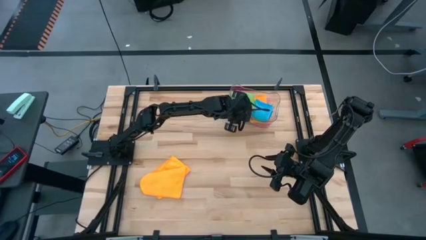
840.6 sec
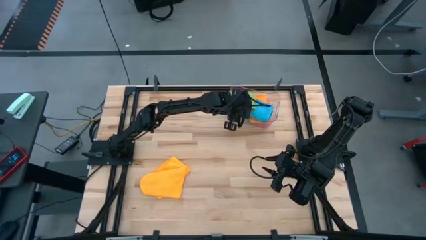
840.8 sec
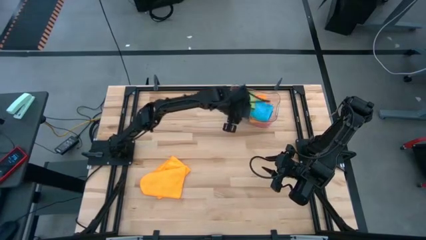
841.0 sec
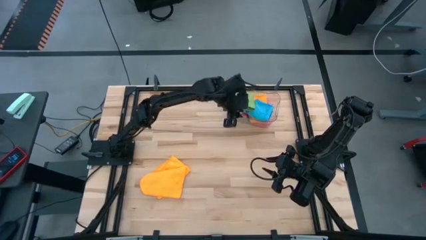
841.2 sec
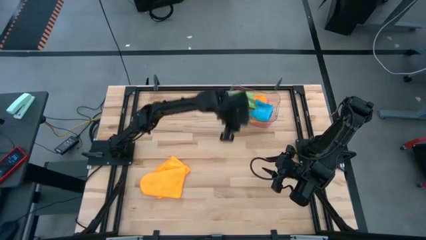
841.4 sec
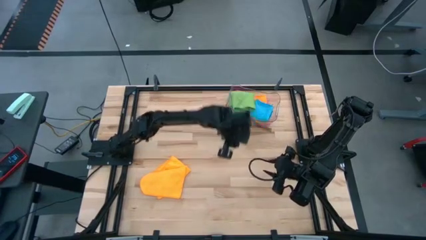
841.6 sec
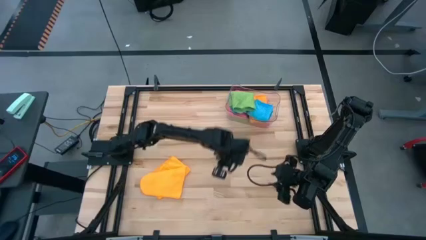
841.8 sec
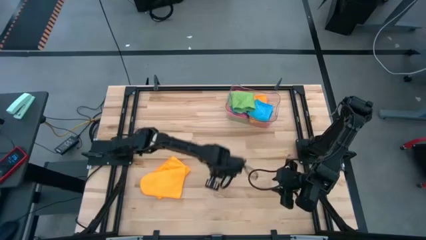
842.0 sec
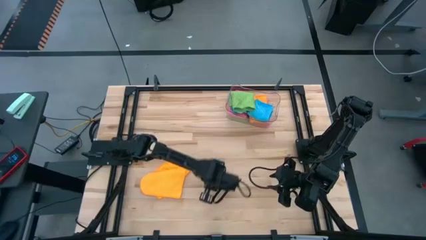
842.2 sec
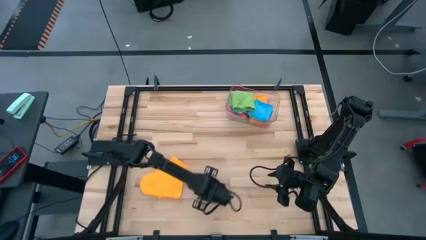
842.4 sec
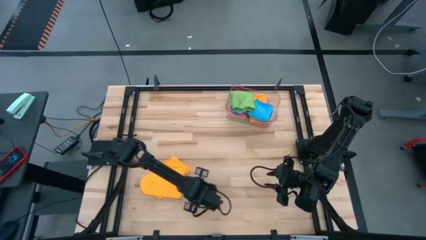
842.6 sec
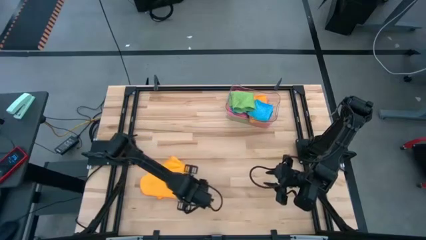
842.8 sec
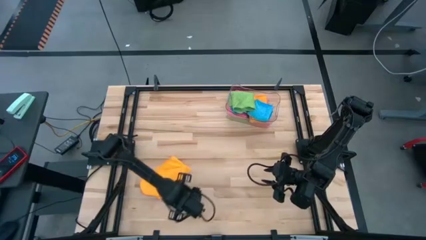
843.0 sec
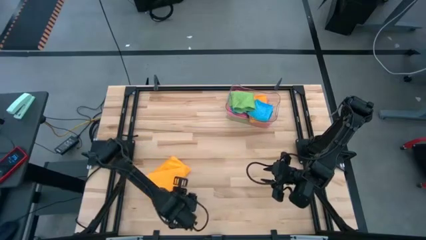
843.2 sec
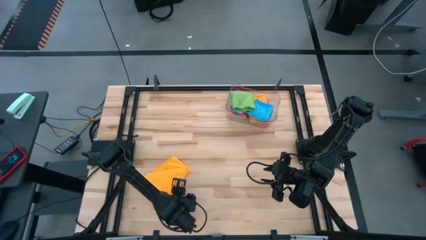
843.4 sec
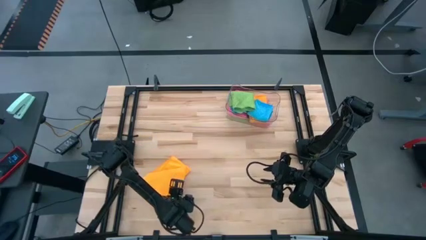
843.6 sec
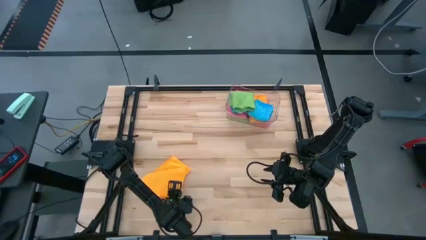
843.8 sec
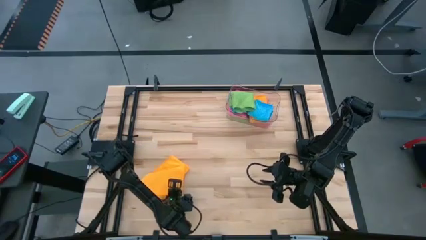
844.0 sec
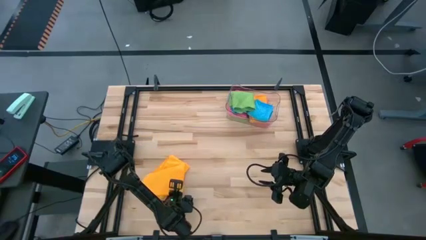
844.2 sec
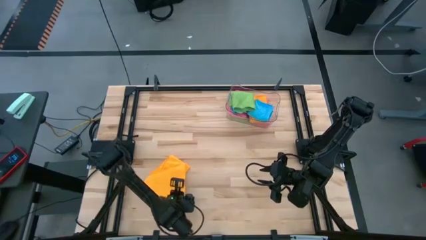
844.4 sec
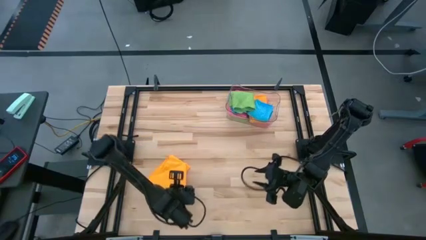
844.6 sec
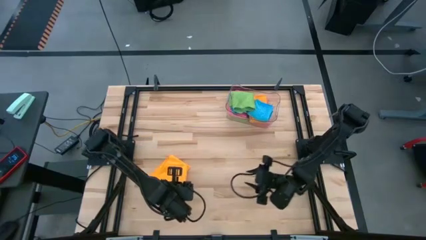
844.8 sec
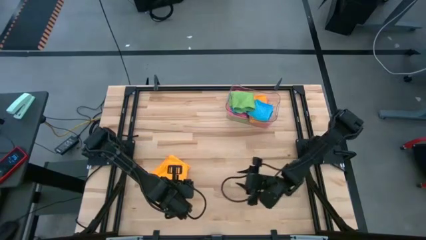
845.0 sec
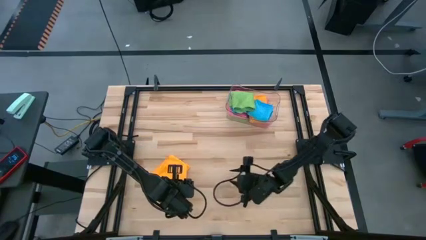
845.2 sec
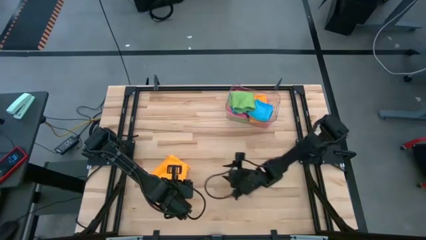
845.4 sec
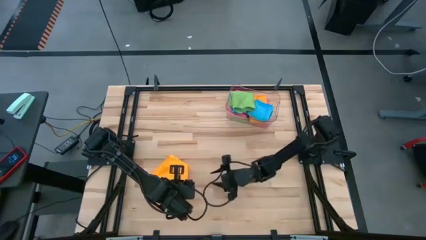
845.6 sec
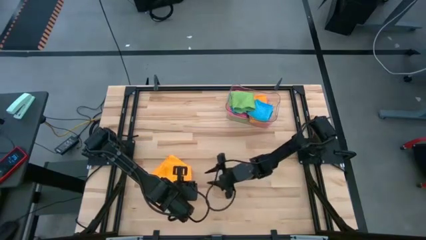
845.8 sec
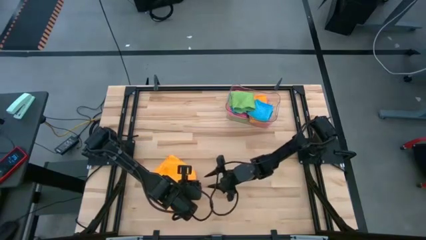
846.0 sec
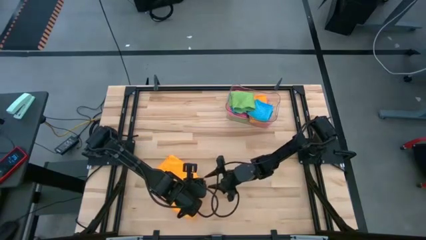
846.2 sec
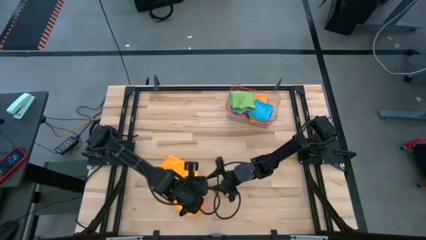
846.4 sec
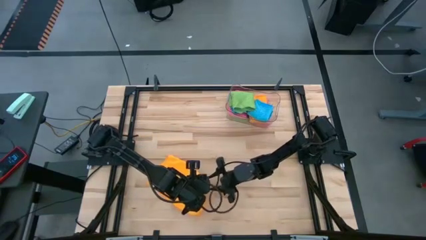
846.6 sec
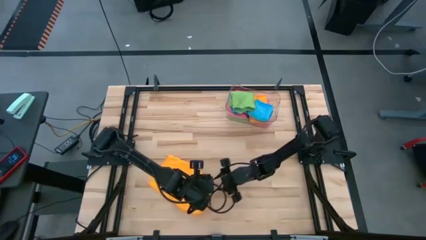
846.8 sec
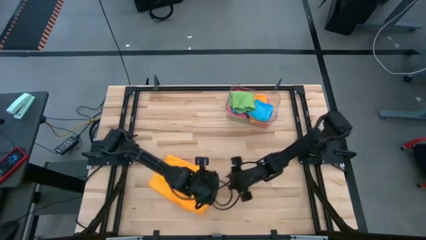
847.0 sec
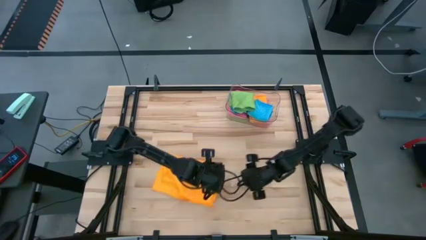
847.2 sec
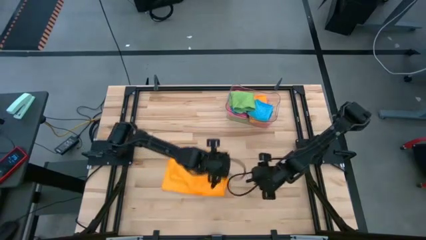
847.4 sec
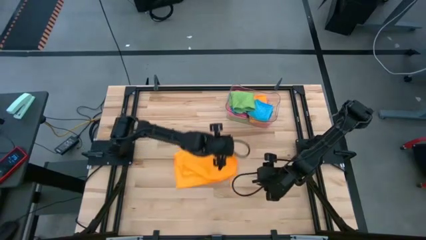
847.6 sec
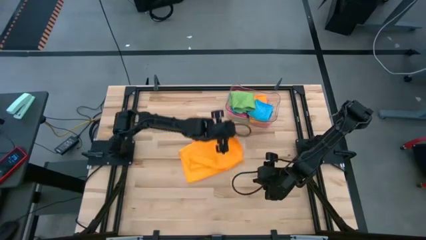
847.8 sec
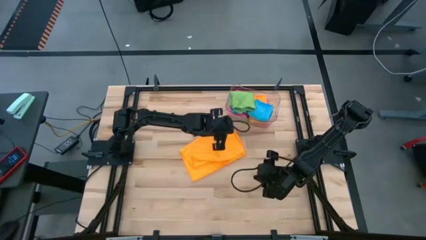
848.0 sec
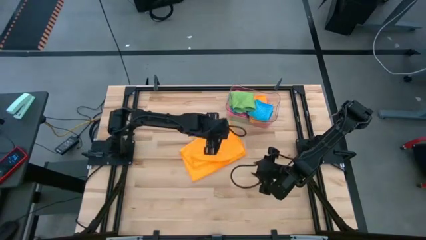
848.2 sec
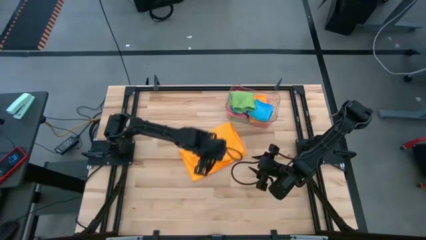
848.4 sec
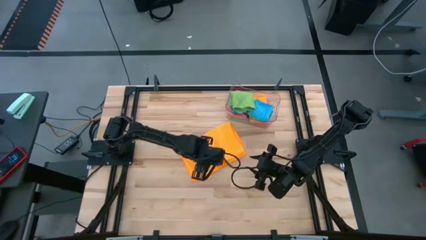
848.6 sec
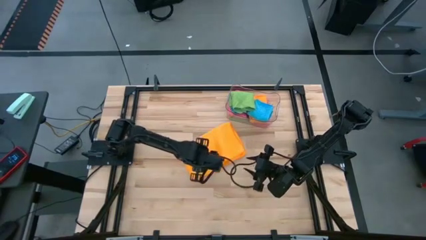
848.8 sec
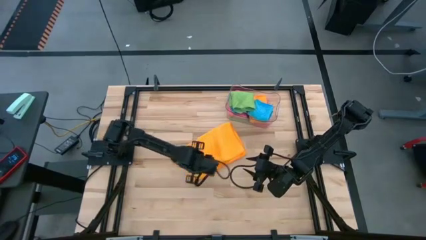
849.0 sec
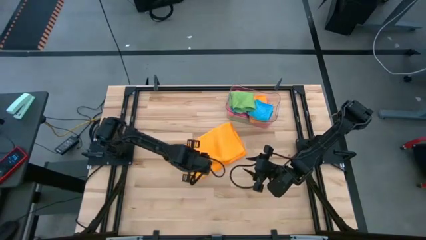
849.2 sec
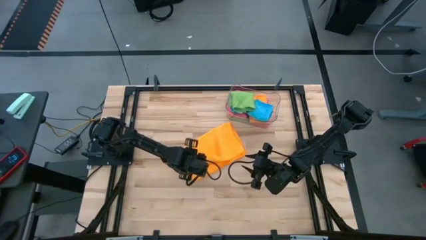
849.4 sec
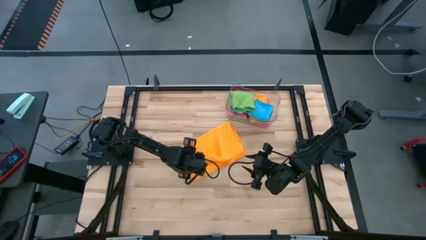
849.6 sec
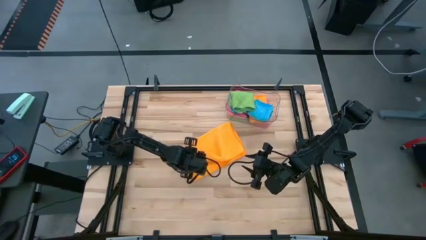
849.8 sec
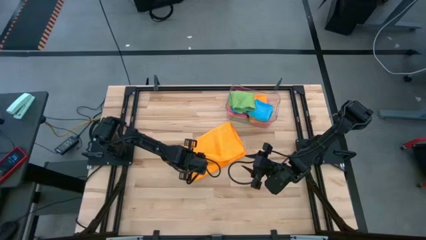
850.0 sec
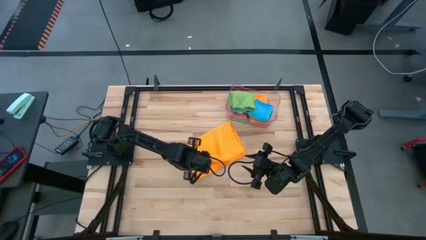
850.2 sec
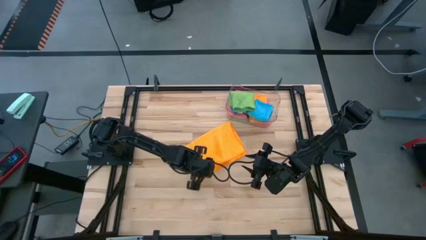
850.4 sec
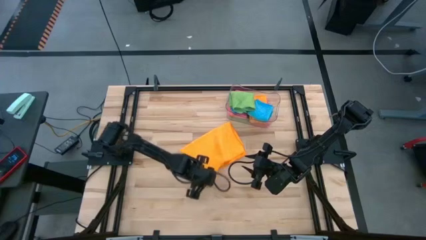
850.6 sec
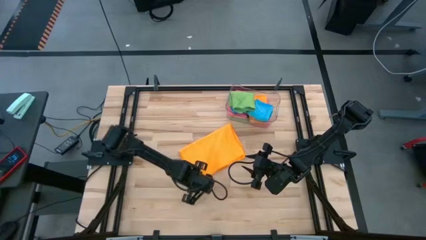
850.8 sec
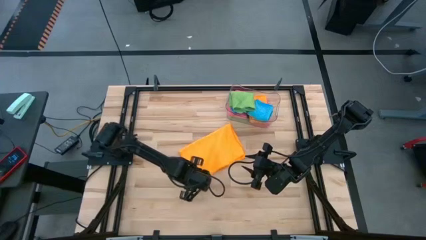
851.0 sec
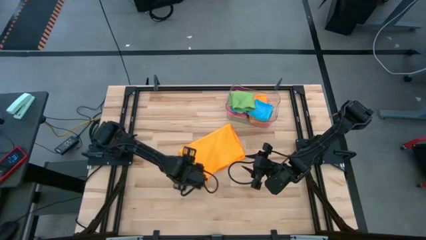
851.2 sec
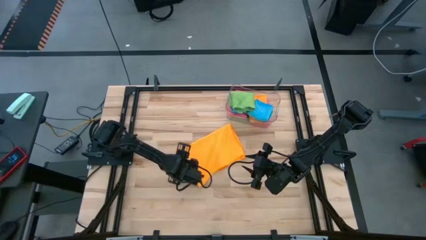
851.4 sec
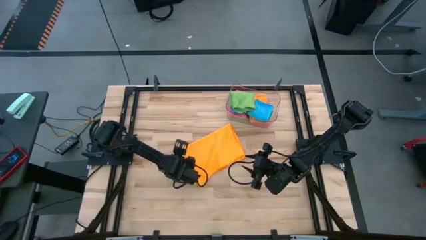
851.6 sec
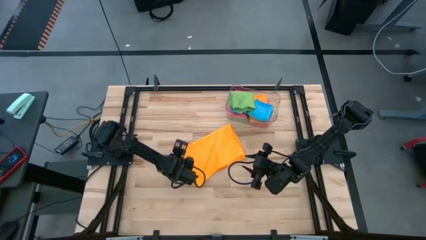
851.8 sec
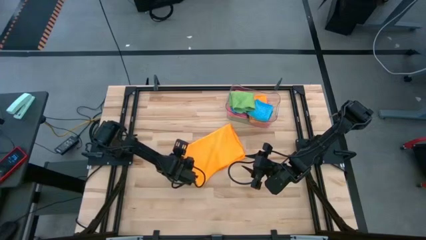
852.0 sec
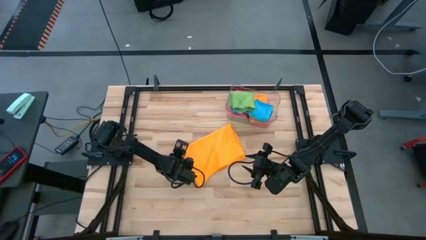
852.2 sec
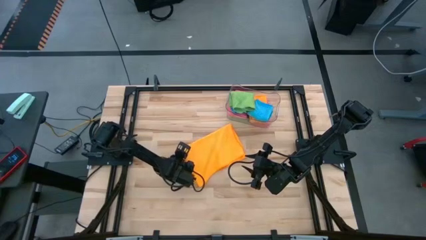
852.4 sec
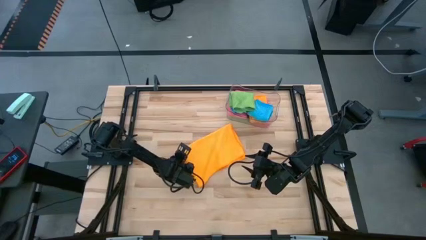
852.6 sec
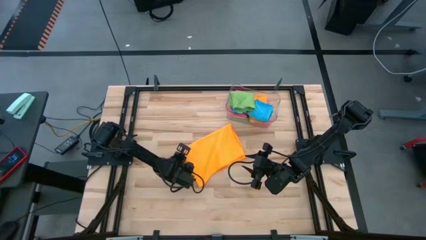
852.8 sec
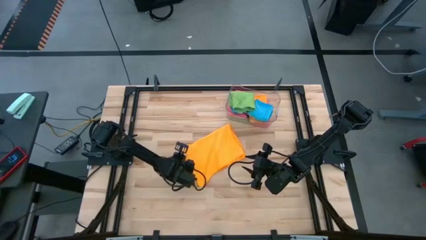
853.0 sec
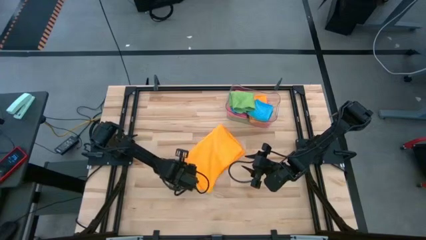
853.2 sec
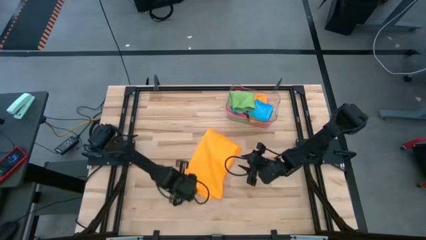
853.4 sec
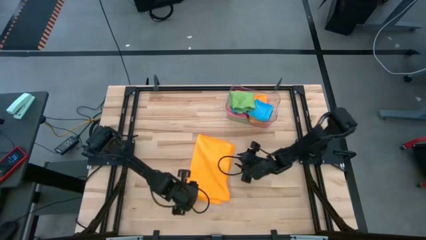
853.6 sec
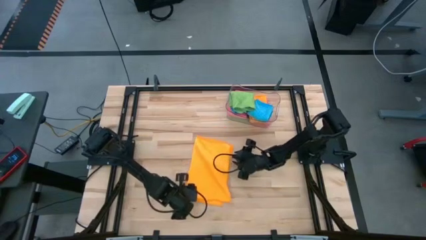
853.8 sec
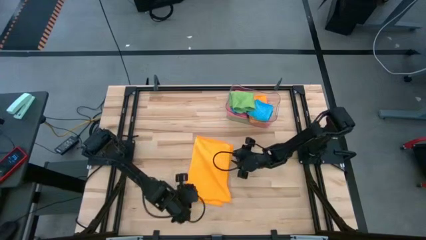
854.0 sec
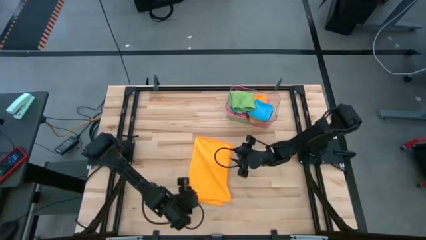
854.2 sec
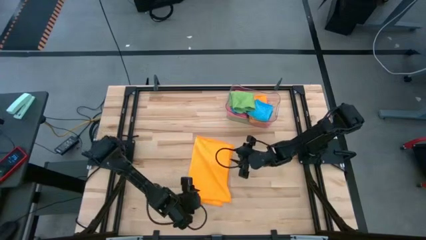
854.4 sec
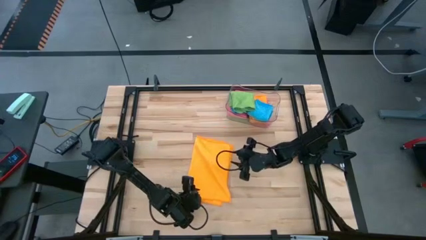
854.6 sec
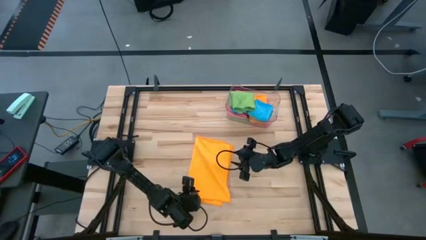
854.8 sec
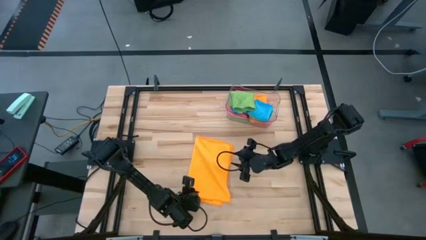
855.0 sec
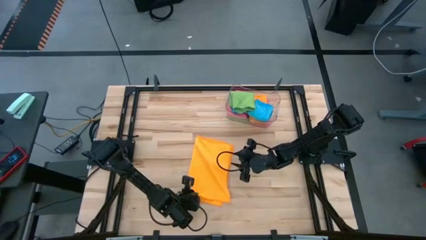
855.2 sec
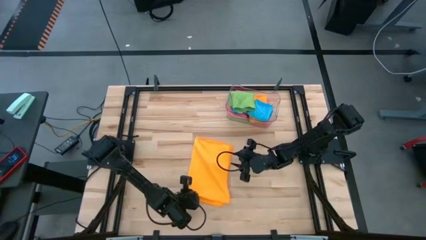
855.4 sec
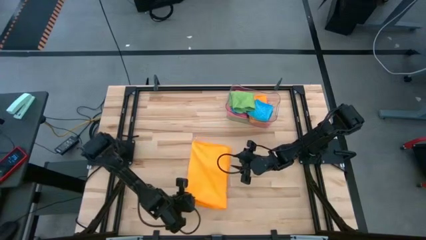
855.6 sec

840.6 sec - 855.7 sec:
Task: Fold microfiber towels
Fold the yellow towel
